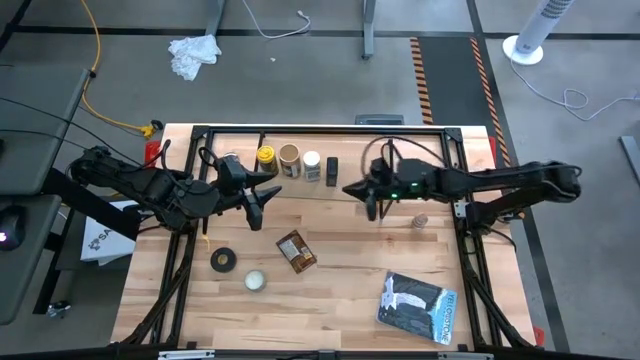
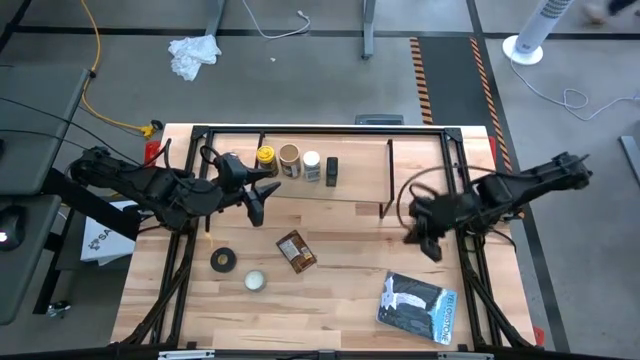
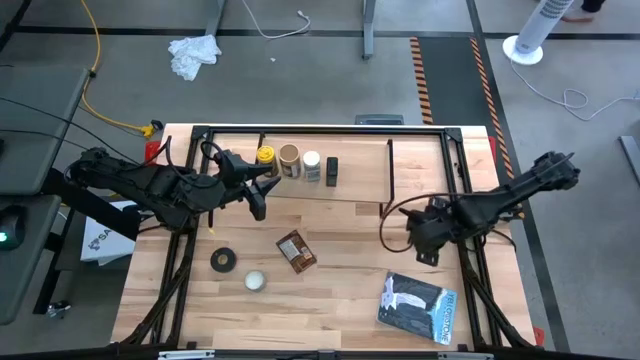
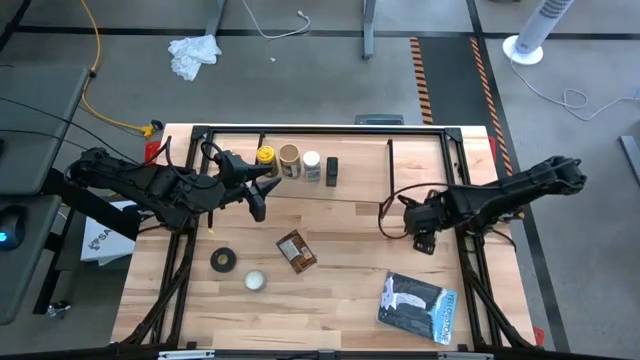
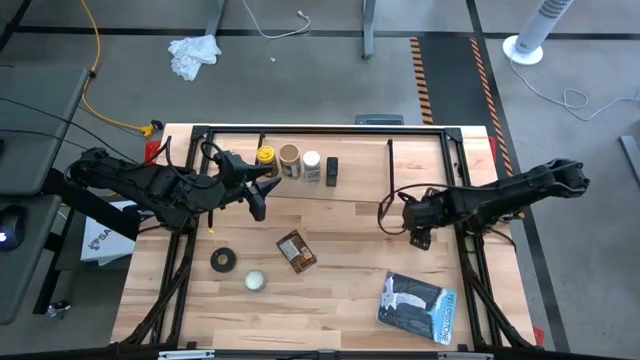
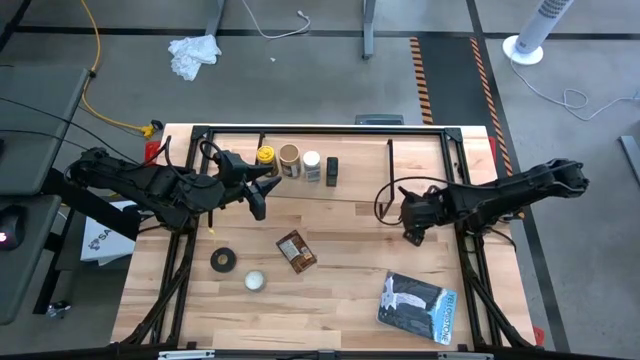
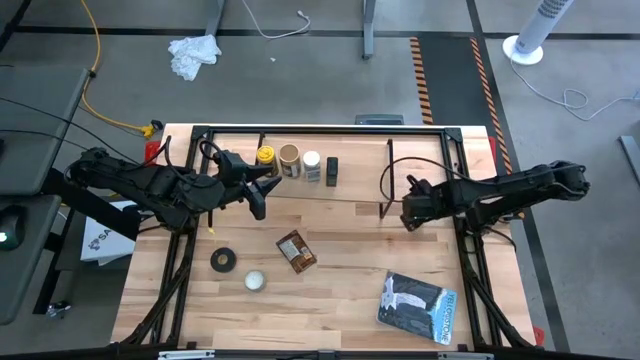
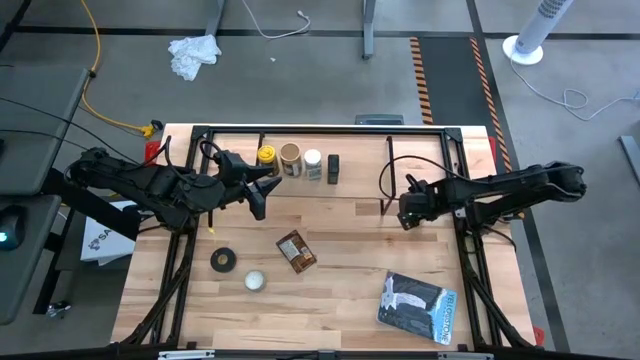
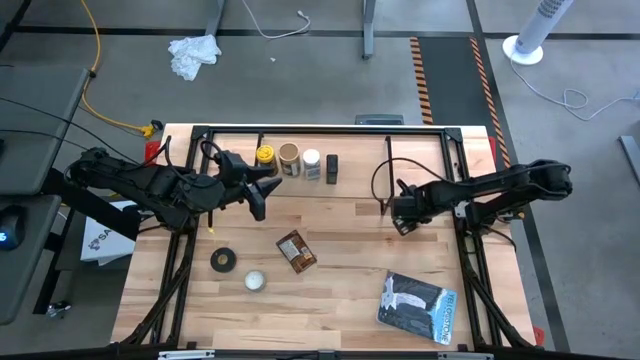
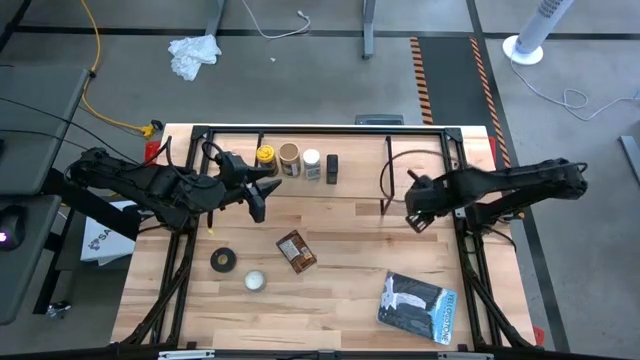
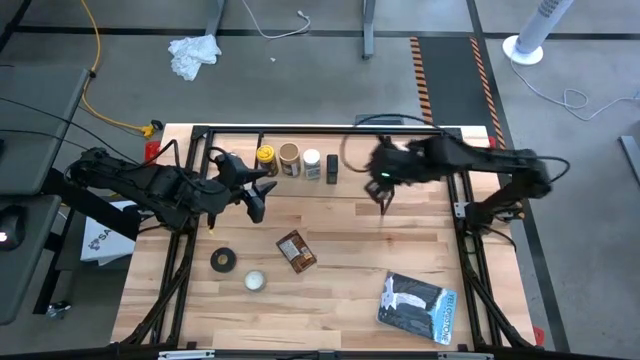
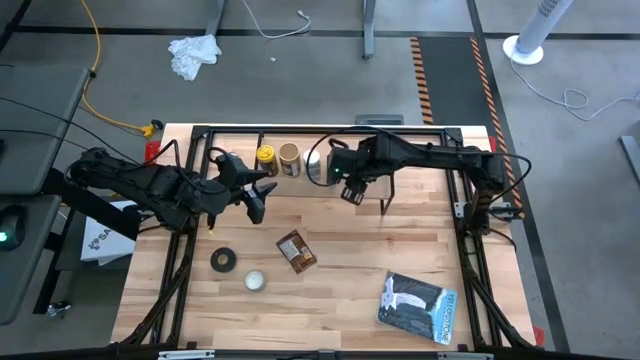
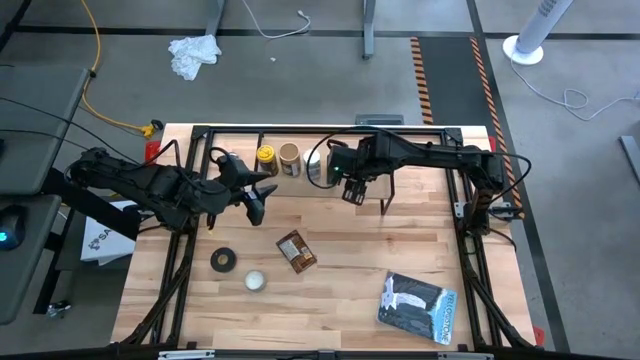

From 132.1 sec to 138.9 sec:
Task: Shelf spices
Put the brown seasoning bottle on the shelf

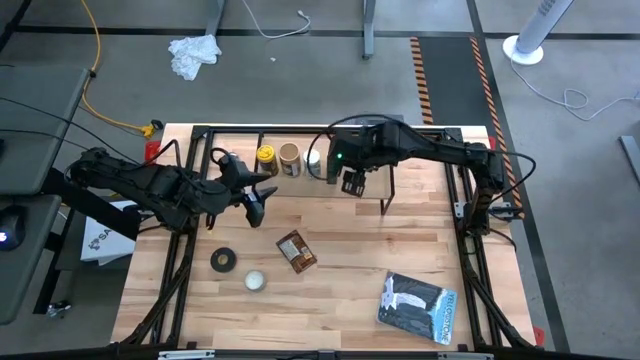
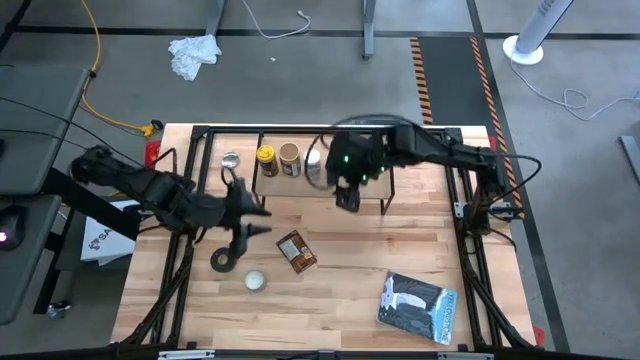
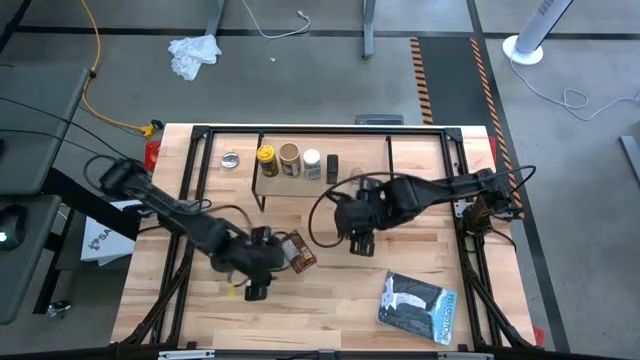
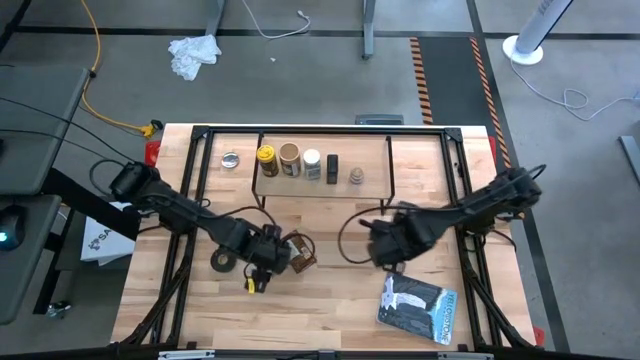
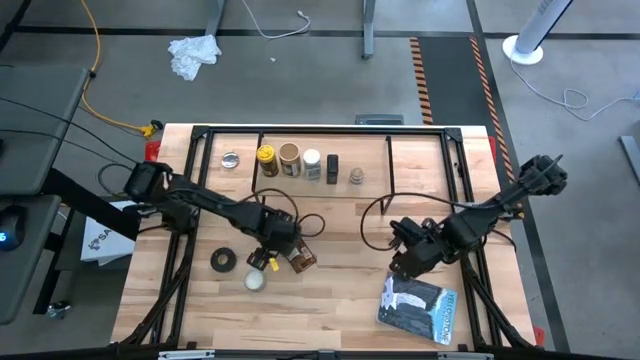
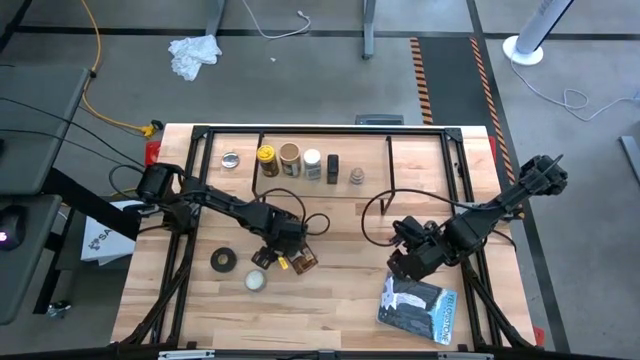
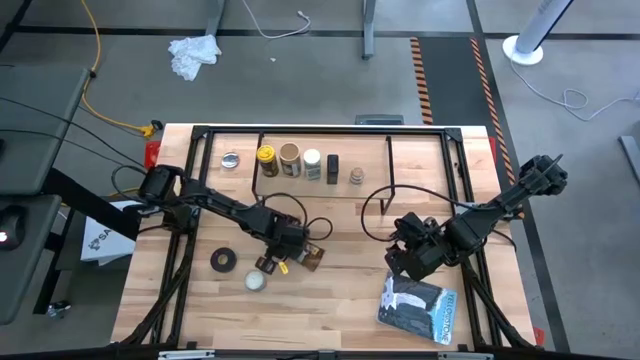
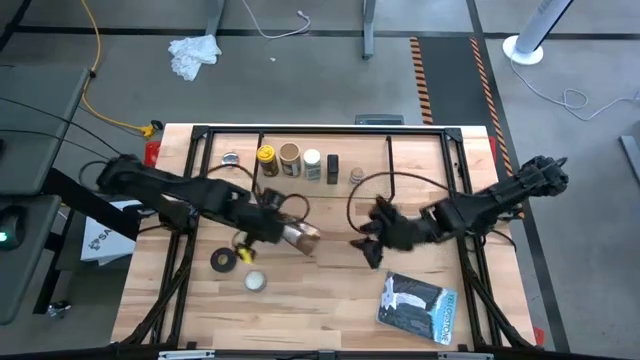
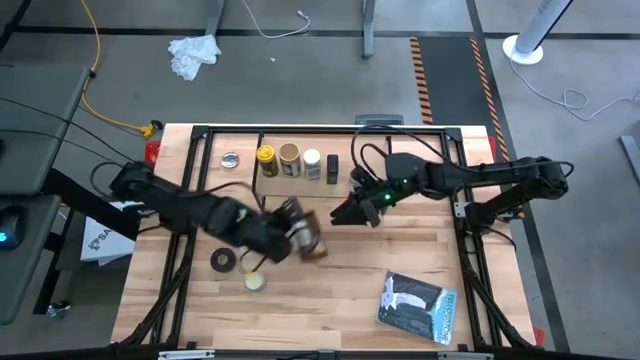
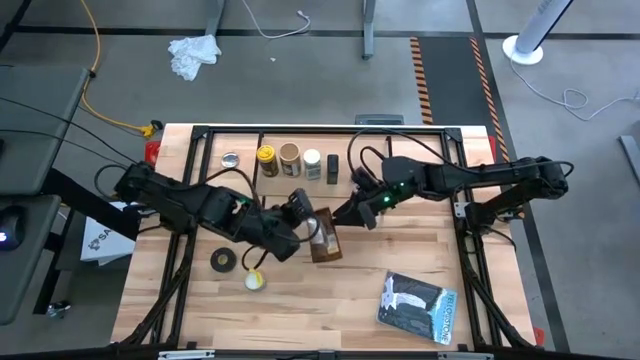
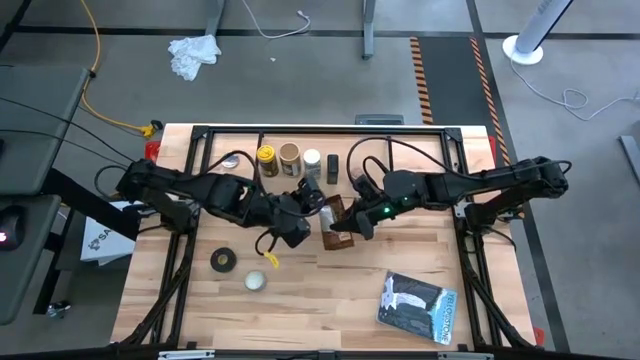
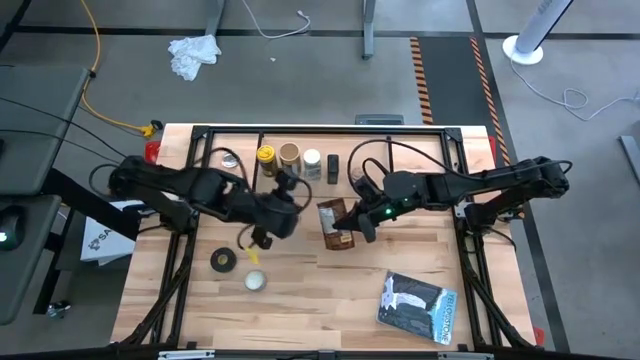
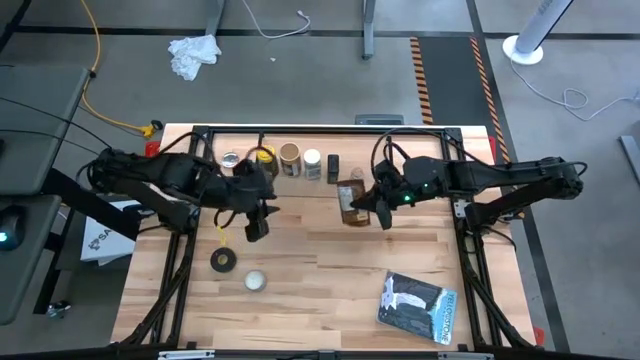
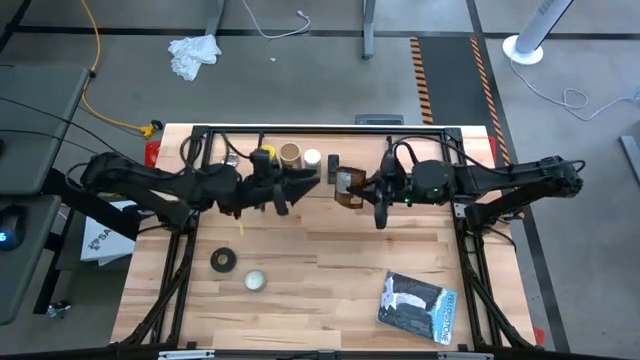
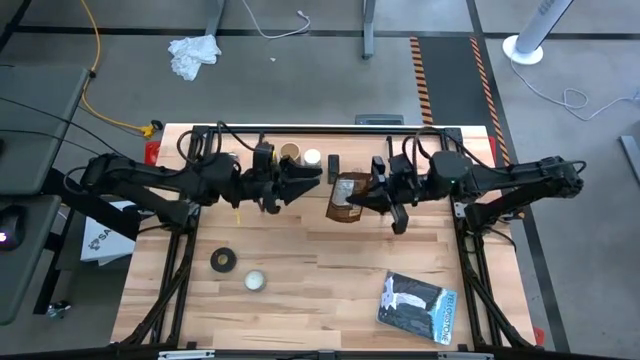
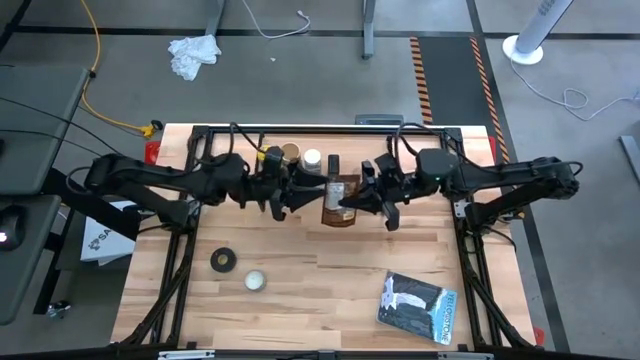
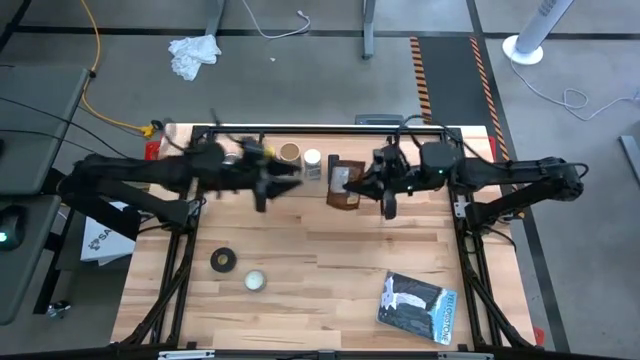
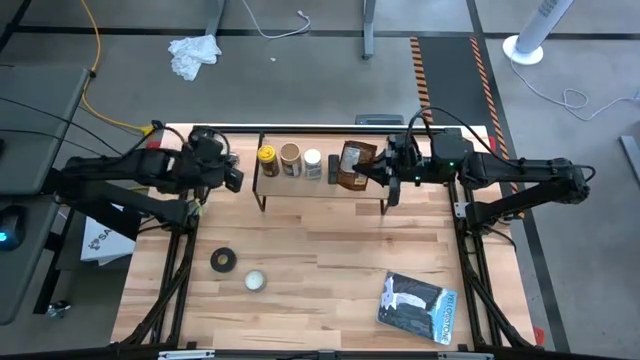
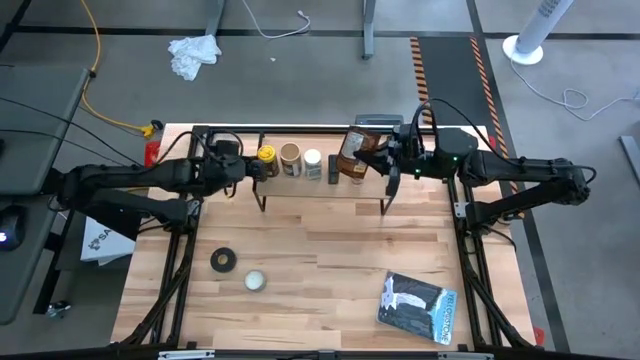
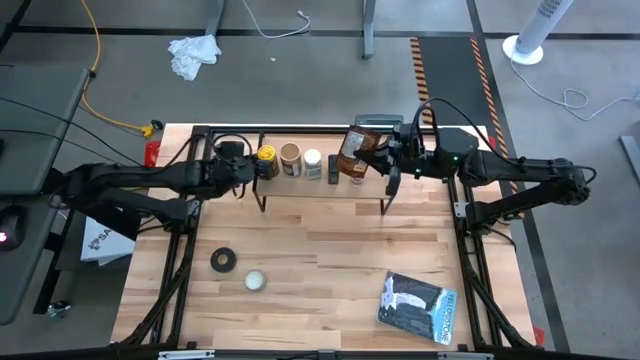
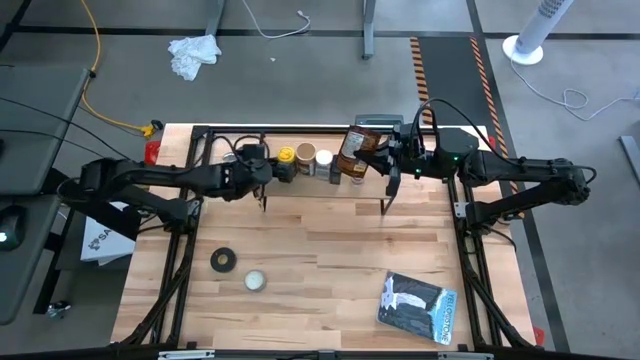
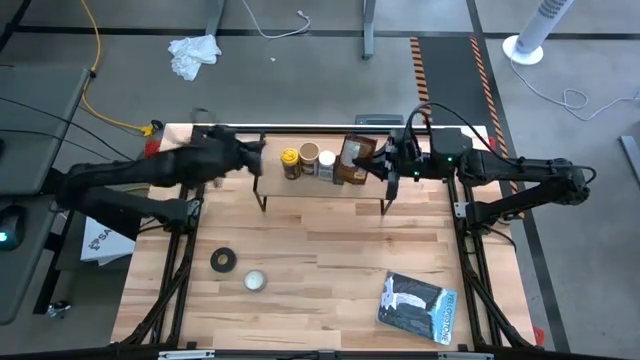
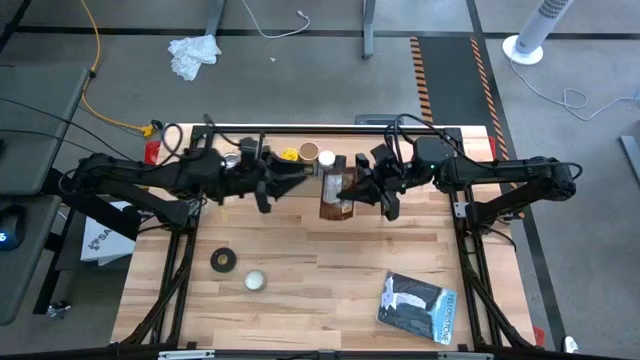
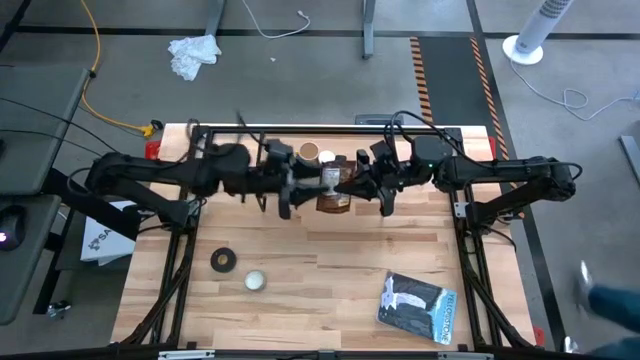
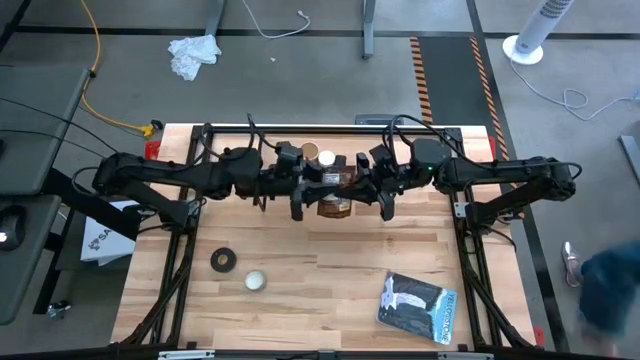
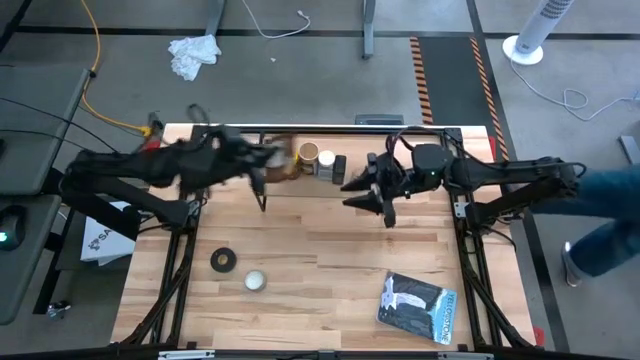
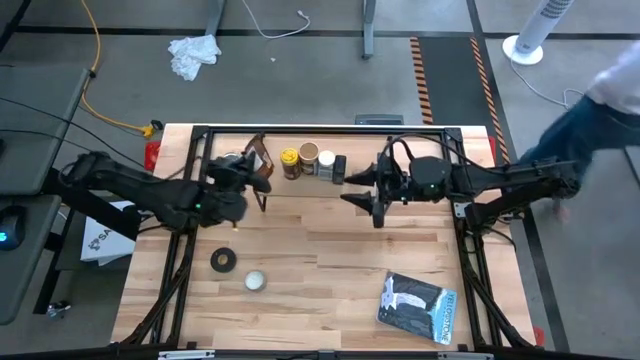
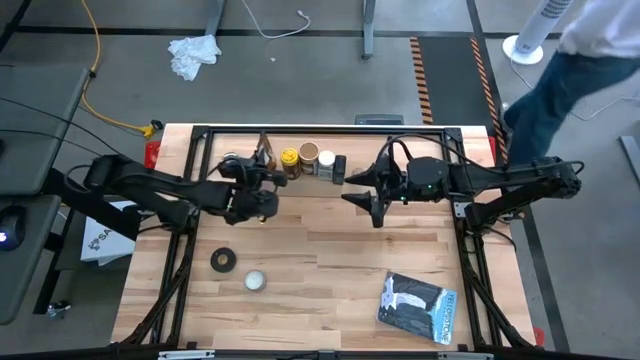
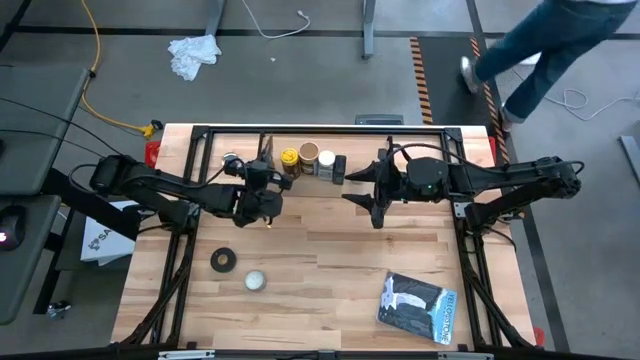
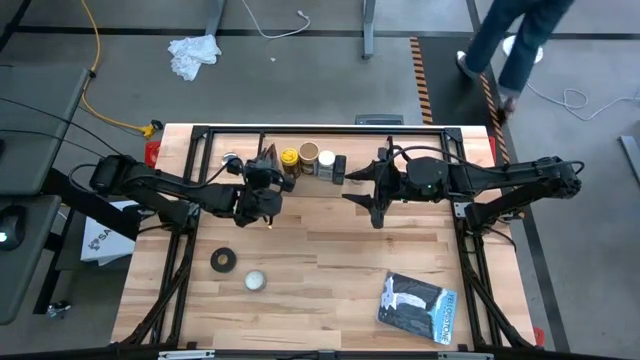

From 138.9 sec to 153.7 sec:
Put the orange seasoning pack on the shelf
